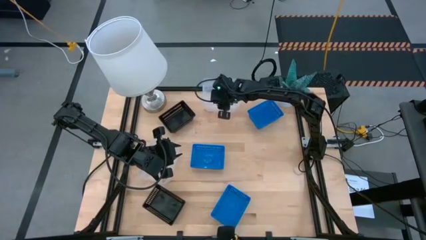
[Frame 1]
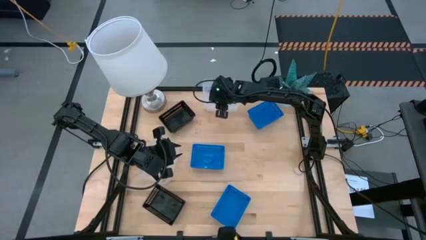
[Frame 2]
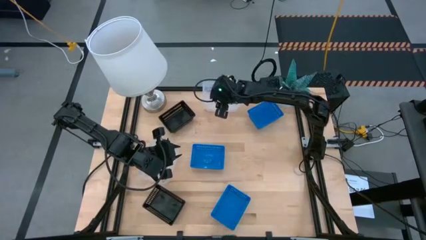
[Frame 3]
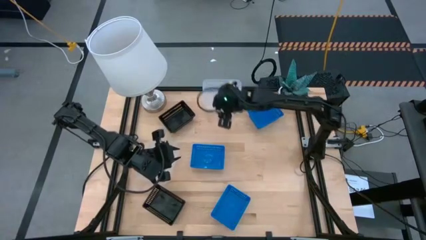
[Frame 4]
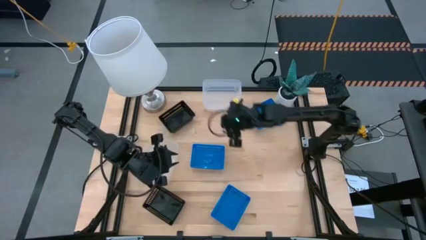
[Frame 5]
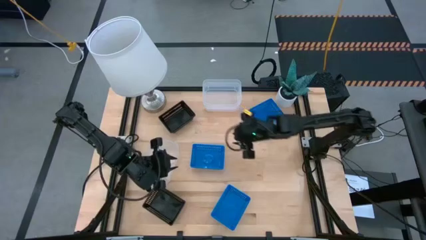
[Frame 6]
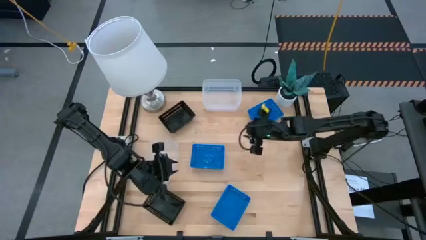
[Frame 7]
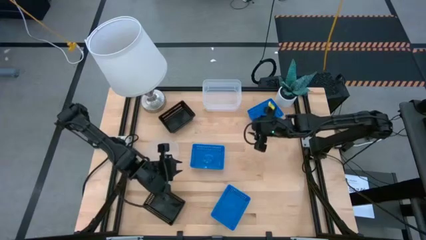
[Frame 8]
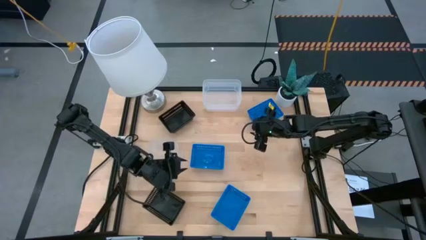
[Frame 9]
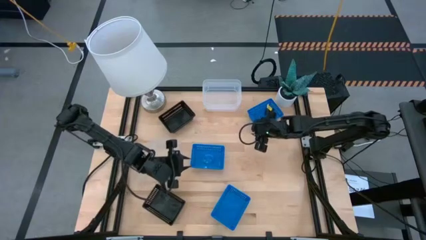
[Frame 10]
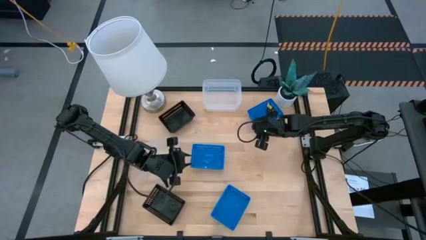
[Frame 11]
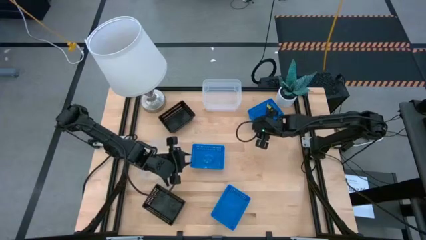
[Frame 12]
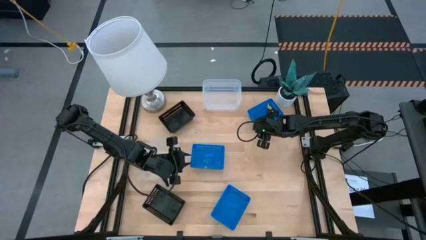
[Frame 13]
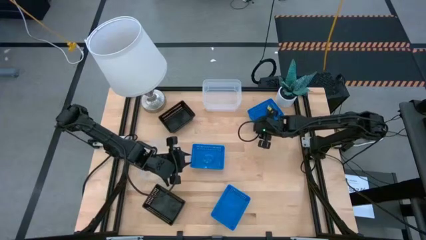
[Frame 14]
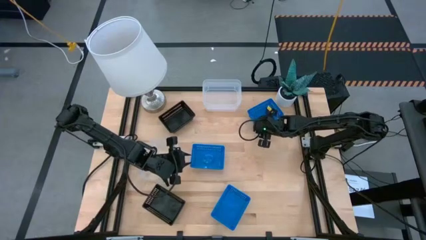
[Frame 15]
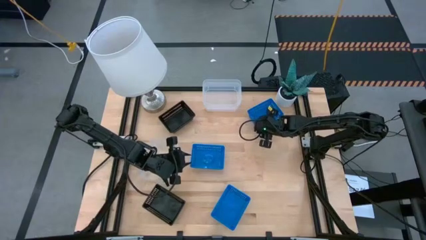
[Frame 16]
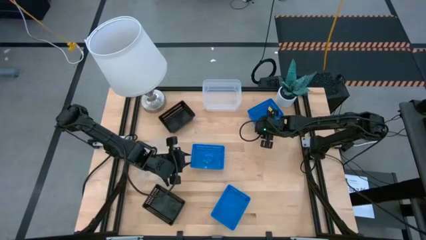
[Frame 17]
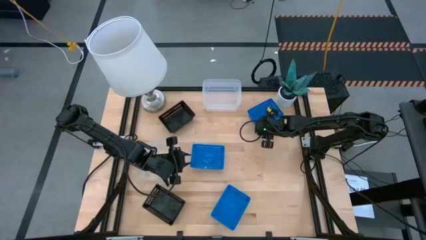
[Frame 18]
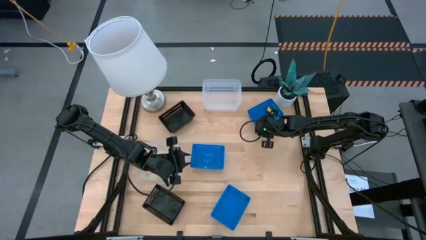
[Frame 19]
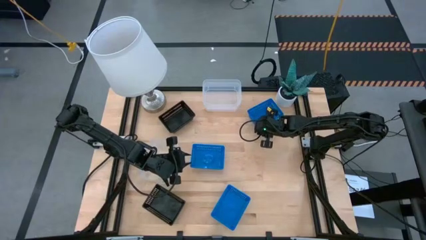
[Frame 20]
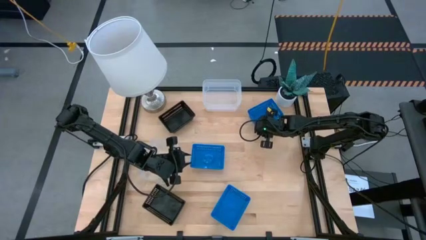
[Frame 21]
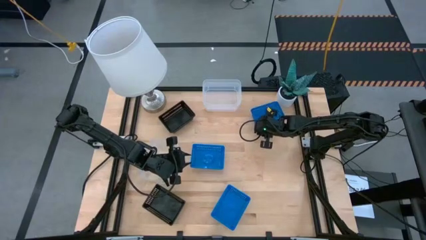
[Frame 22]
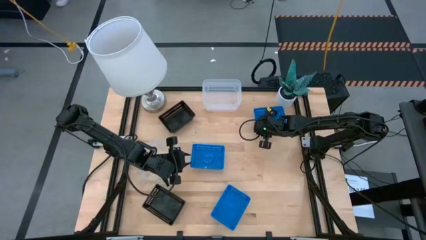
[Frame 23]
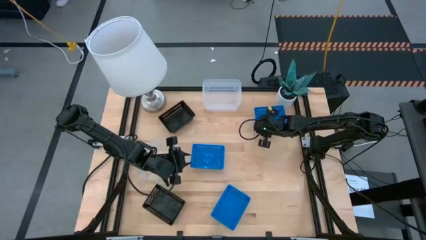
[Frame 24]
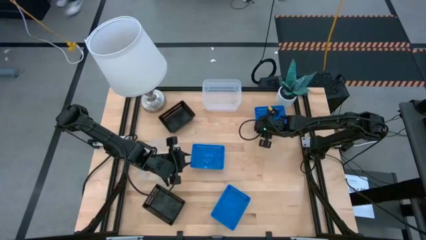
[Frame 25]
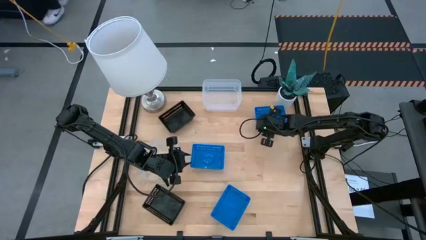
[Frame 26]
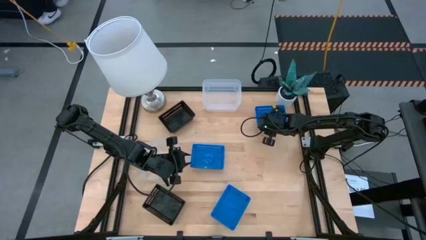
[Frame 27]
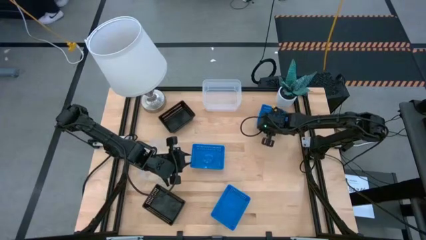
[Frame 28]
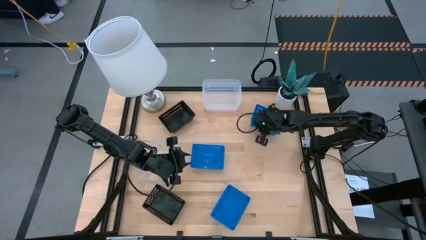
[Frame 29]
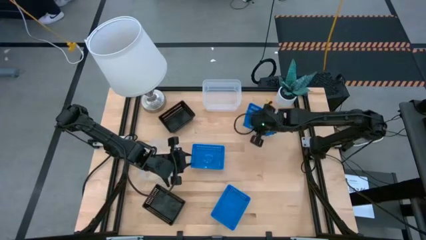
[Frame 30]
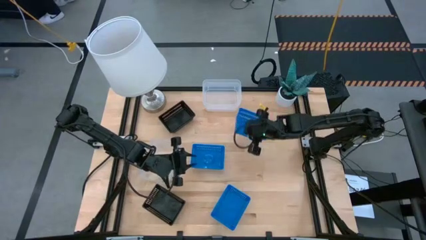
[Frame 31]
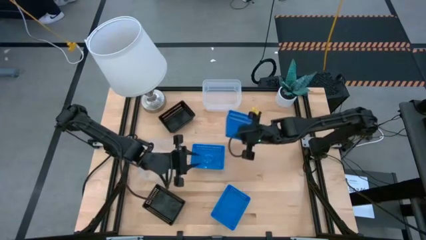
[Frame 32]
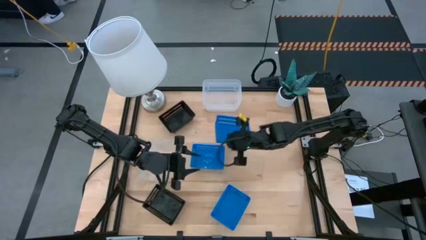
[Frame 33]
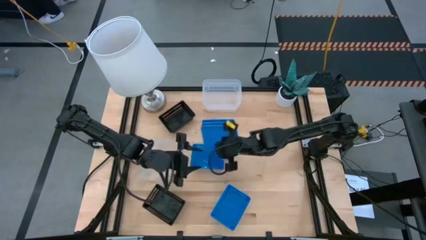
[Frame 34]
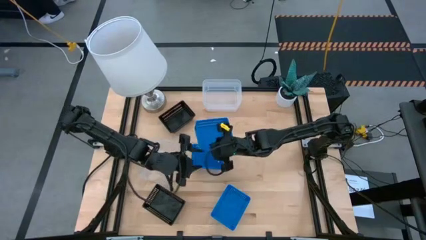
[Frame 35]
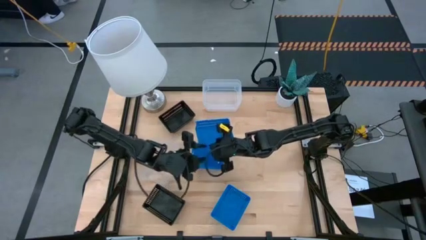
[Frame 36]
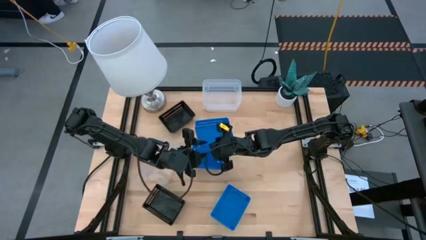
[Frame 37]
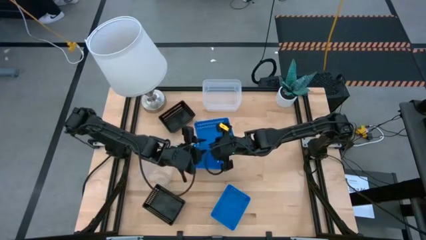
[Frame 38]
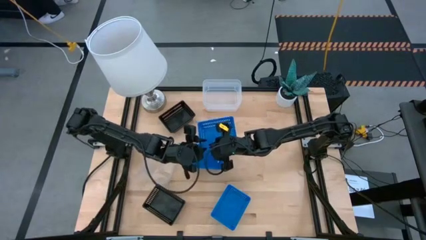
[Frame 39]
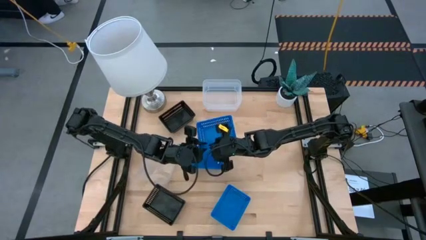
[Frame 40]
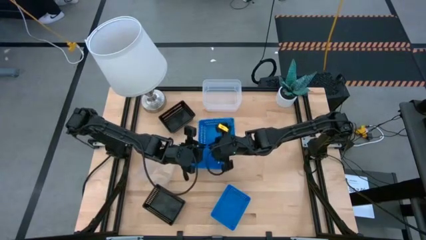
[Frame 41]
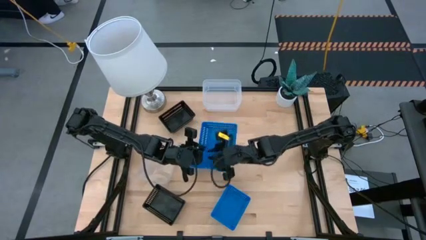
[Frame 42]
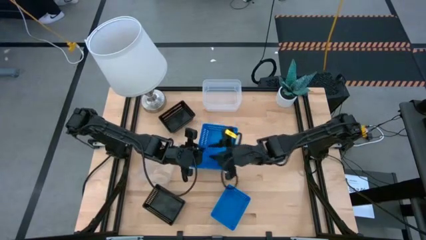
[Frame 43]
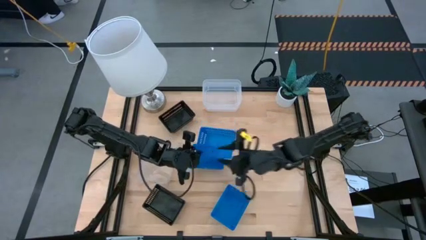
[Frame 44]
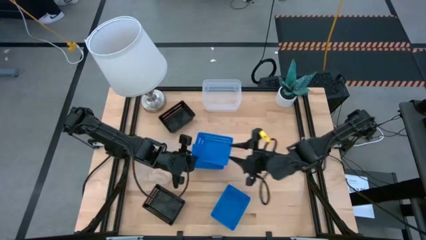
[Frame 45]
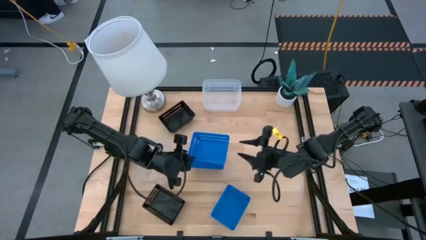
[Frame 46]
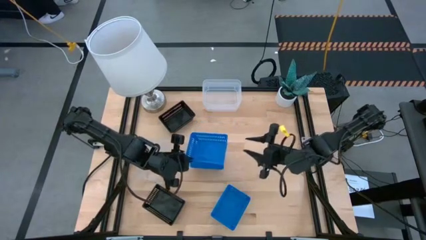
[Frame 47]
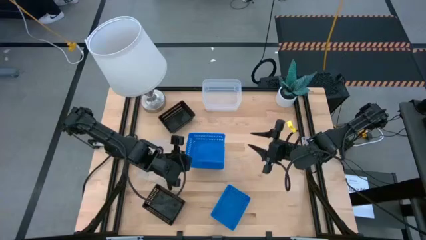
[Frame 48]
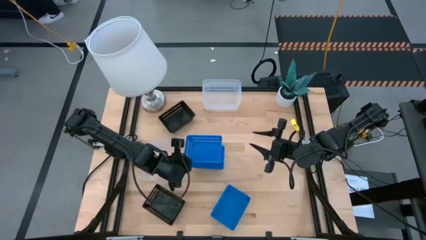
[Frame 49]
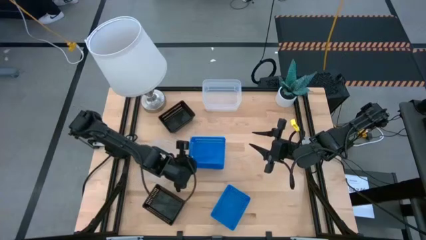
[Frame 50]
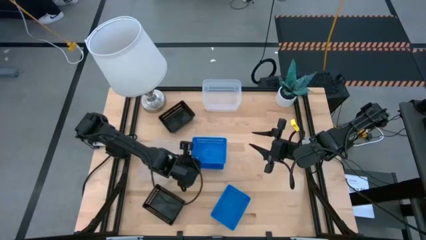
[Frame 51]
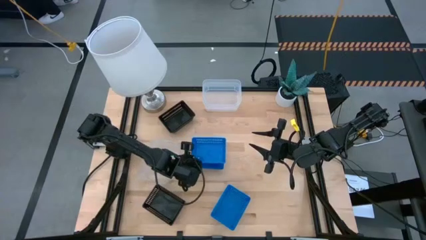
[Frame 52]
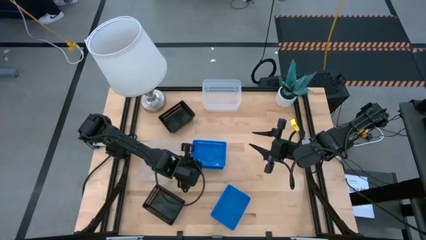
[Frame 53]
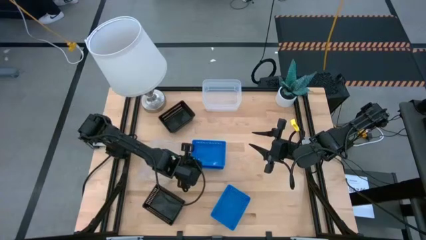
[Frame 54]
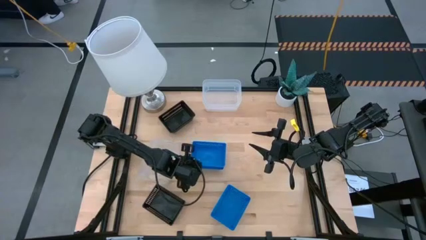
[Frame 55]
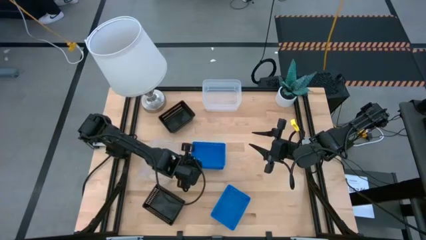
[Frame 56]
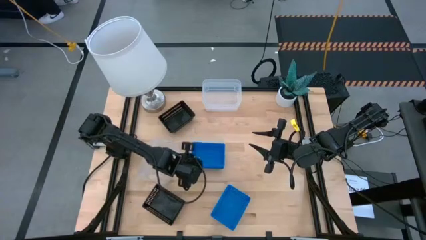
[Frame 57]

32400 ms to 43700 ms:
Stack the top right blue bin on the top left blue bin

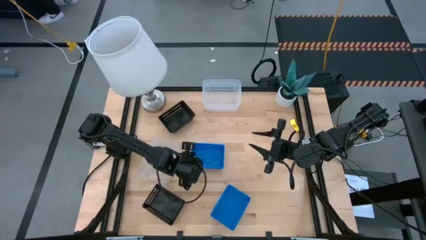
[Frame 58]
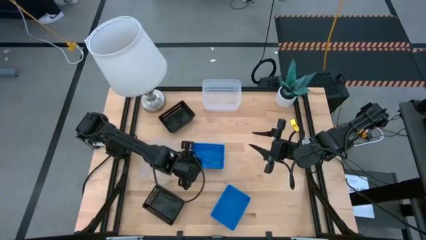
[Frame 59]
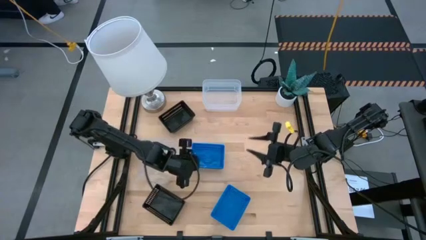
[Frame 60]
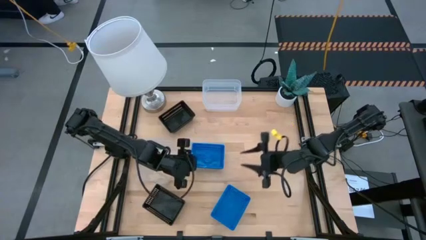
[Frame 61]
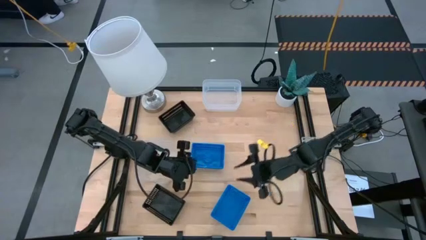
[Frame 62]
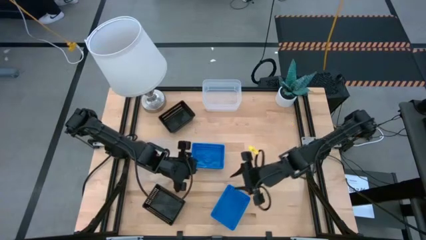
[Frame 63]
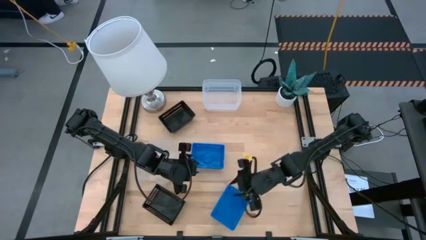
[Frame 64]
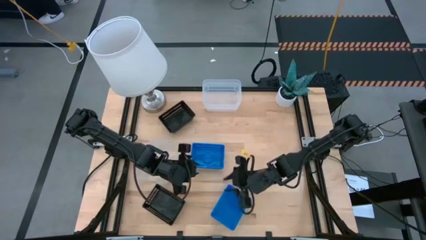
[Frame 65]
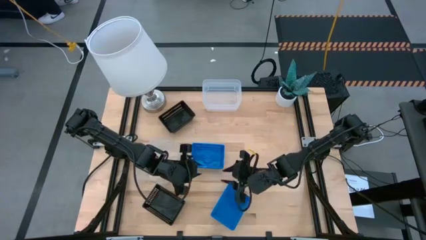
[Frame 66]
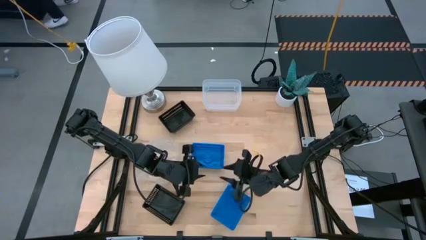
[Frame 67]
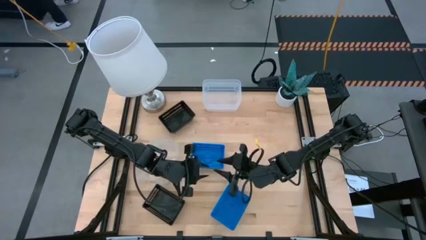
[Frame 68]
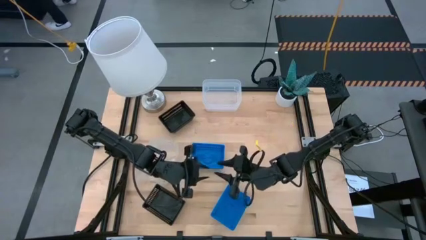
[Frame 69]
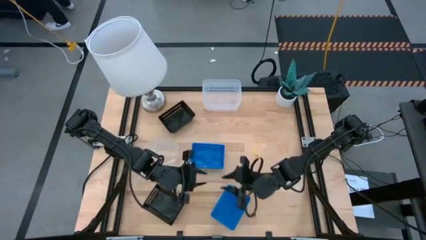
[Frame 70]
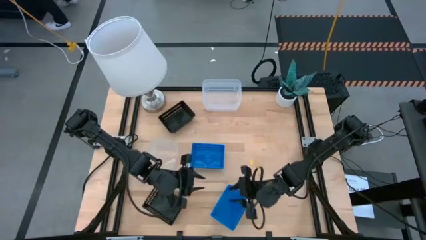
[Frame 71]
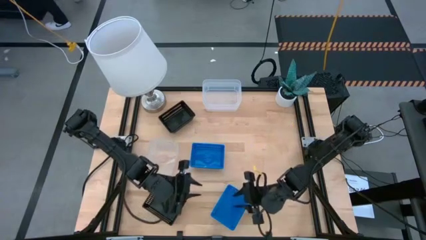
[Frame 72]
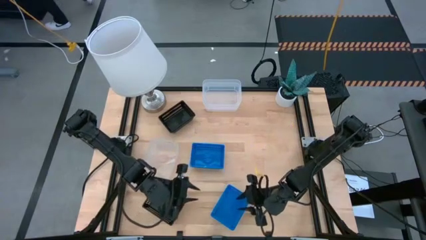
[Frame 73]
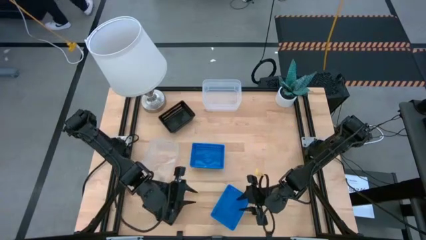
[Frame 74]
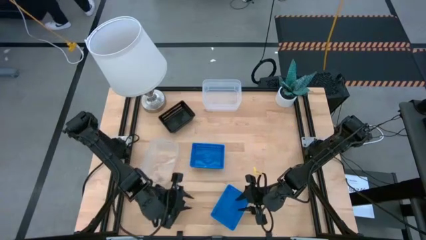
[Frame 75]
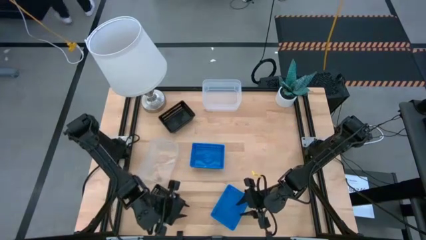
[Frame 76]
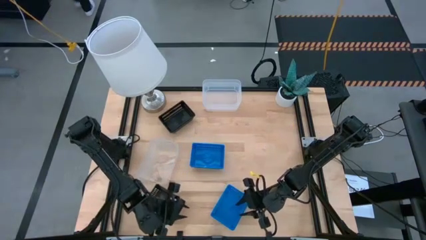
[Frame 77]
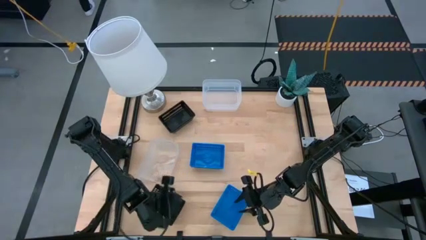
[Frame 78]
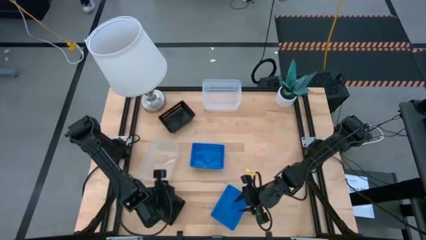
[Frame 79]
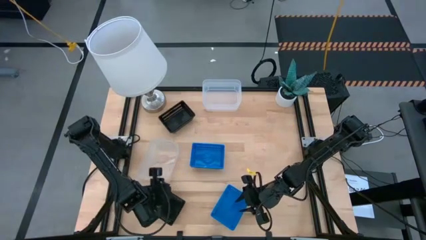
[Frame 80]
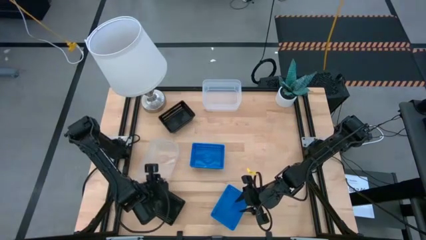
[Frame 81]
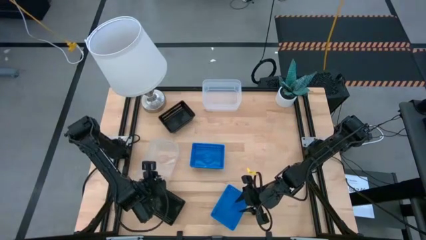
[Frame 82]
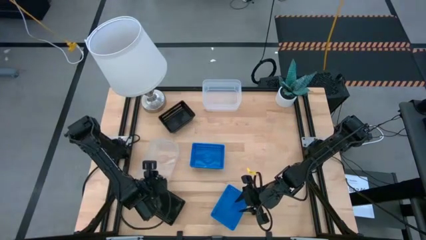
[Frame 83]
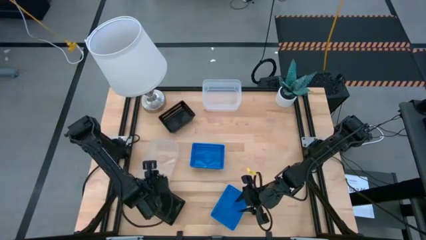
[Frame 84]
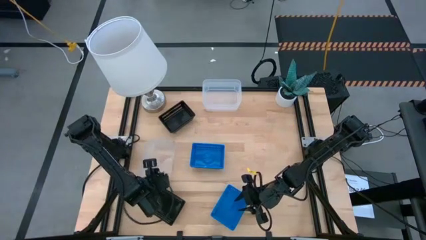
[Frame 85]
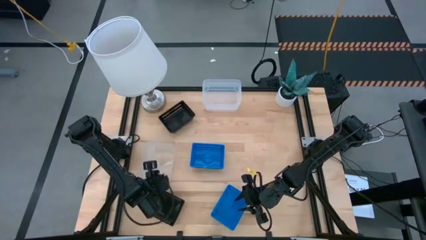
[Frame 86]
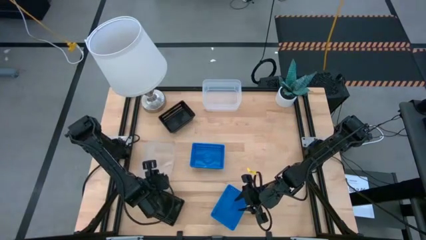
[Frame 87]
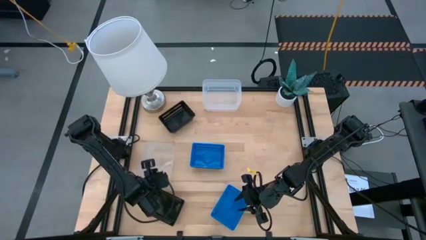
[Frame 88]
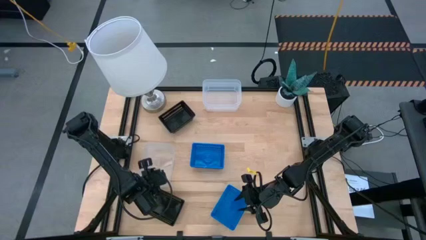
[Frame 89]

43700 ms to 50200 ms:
Stack the bottom transparent bin on the top transparent bin
